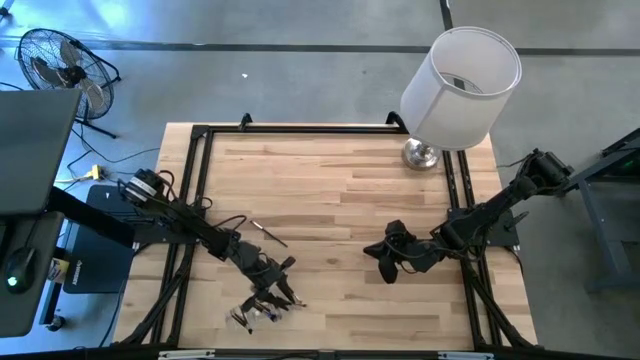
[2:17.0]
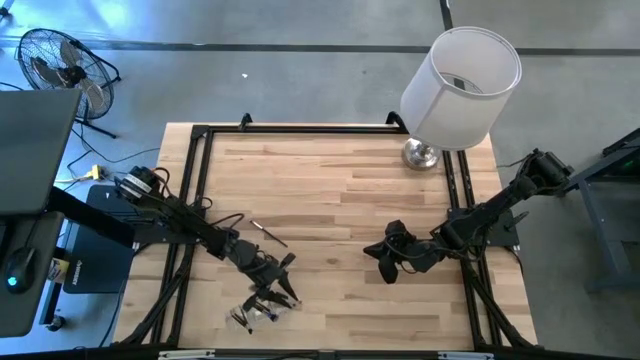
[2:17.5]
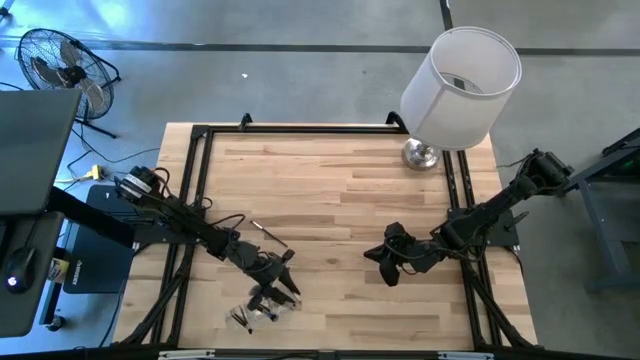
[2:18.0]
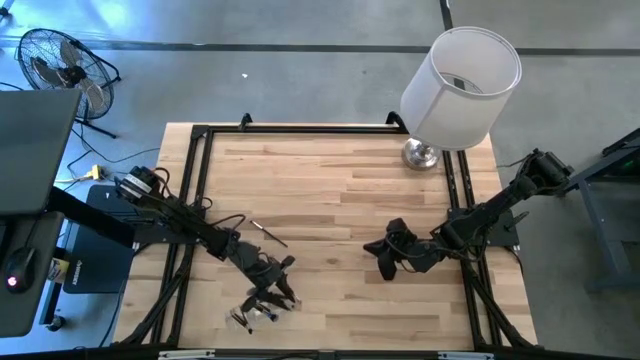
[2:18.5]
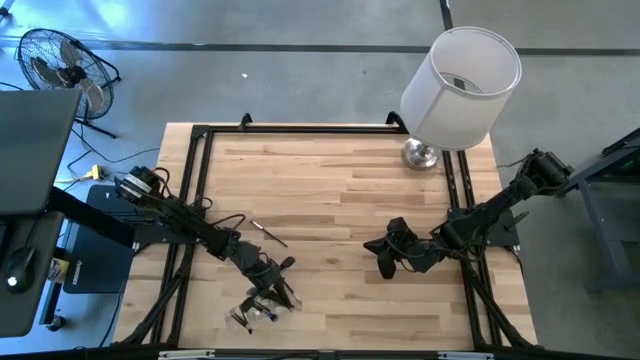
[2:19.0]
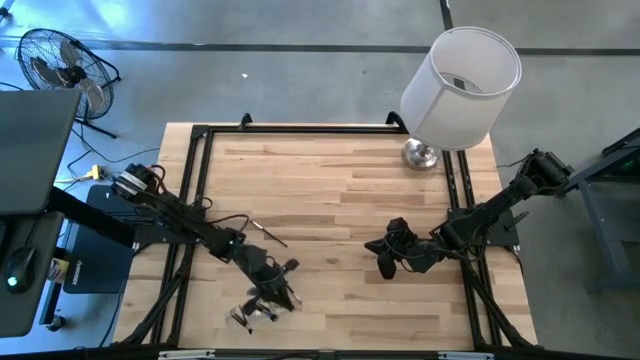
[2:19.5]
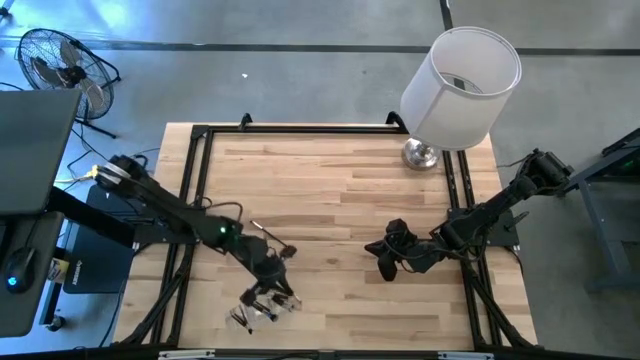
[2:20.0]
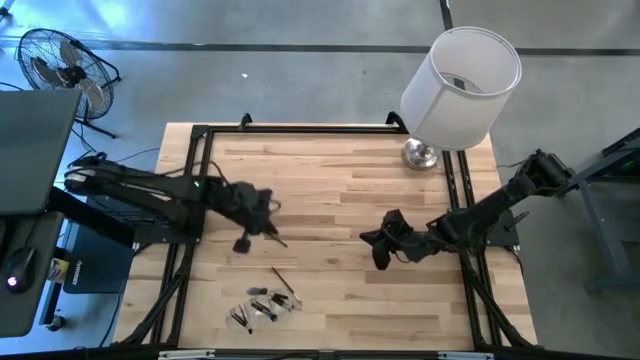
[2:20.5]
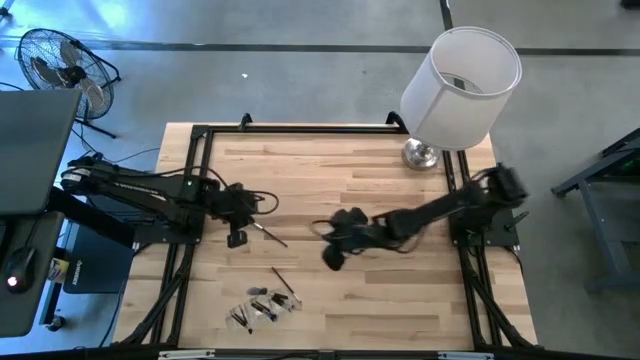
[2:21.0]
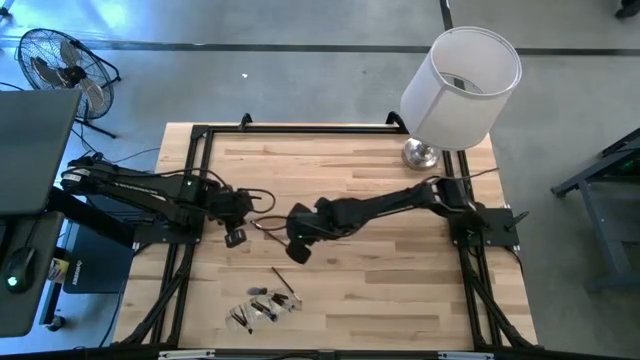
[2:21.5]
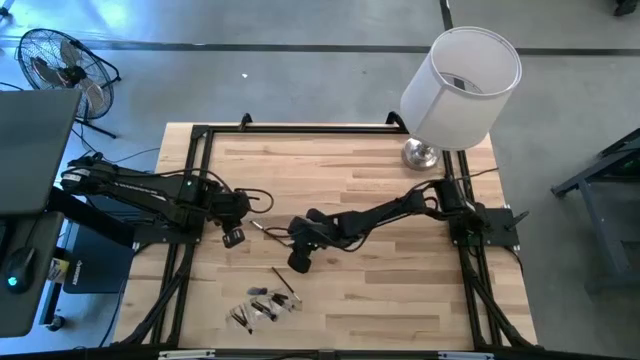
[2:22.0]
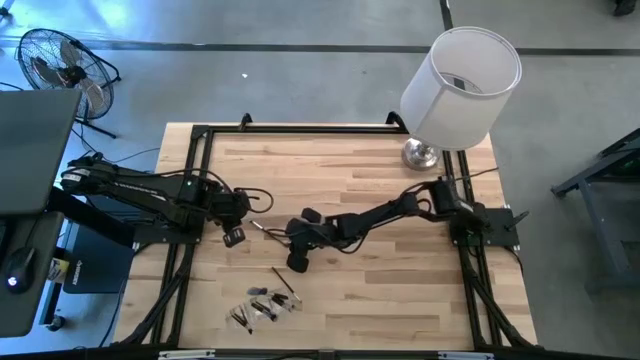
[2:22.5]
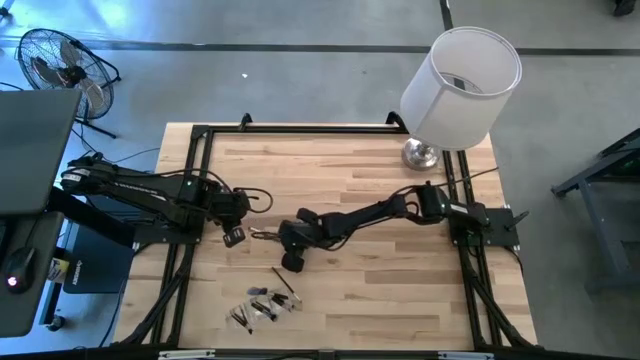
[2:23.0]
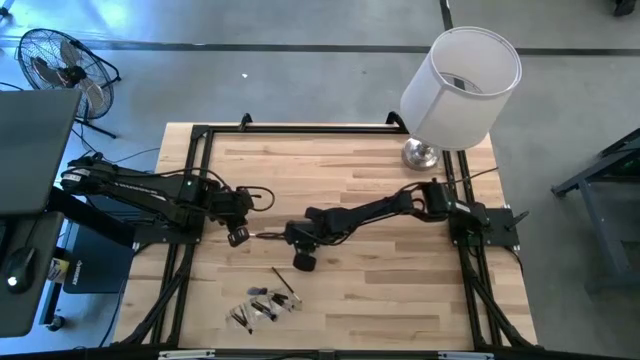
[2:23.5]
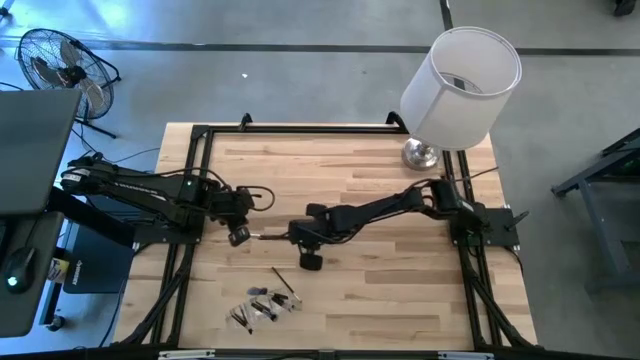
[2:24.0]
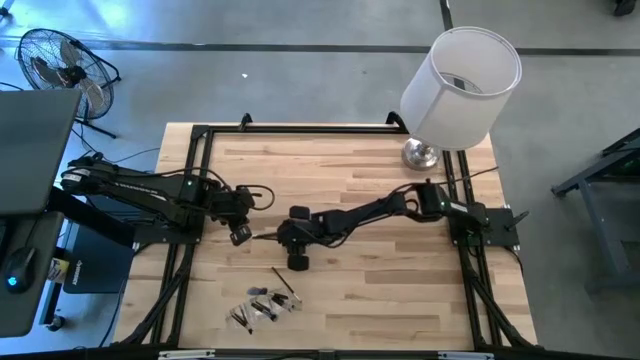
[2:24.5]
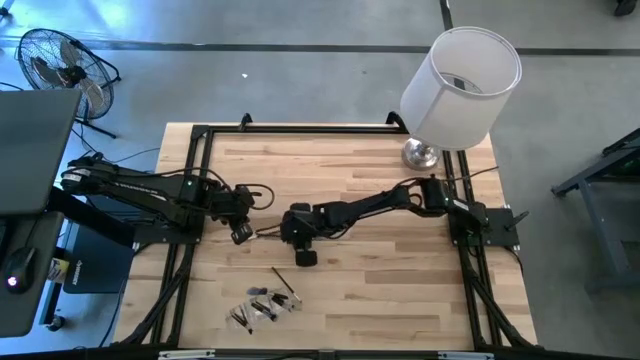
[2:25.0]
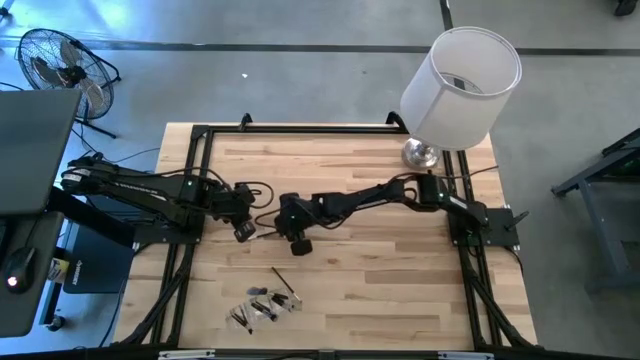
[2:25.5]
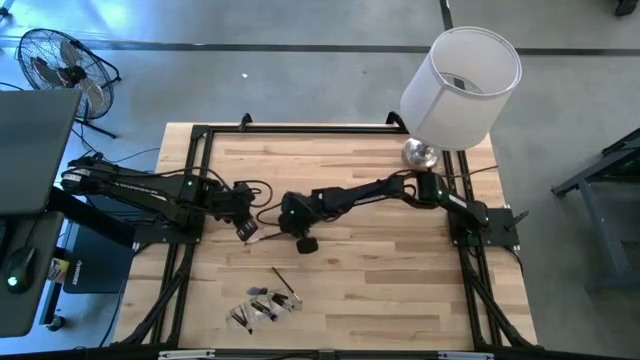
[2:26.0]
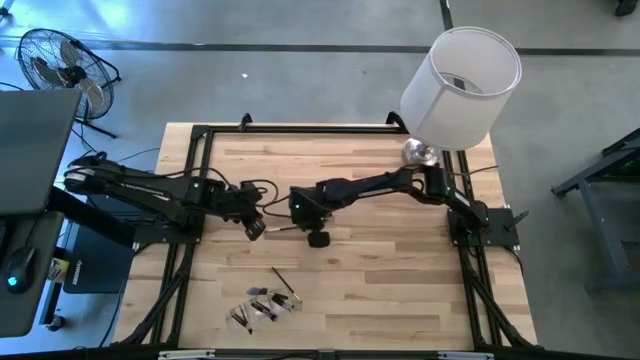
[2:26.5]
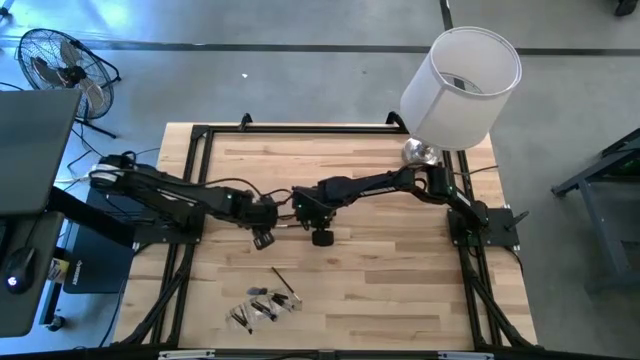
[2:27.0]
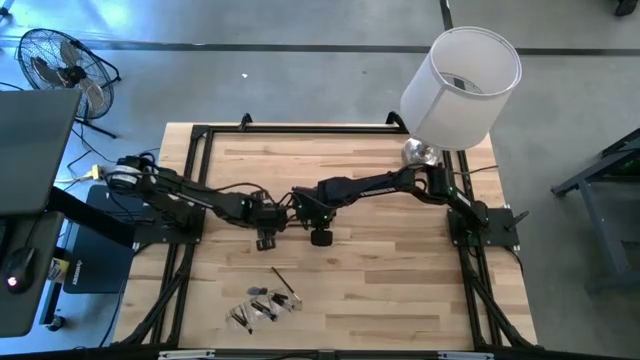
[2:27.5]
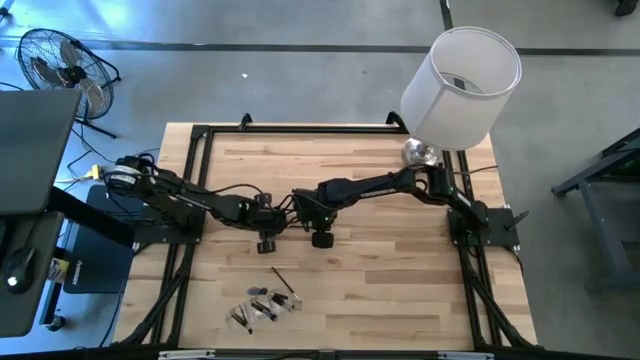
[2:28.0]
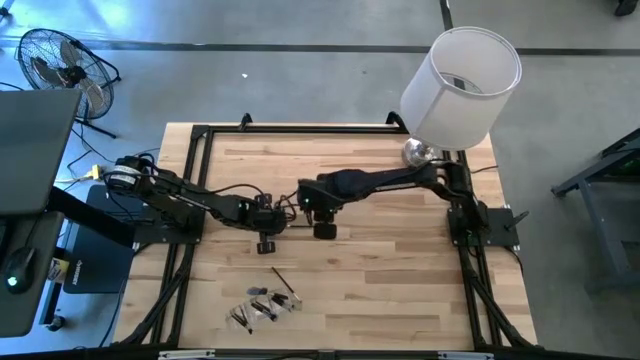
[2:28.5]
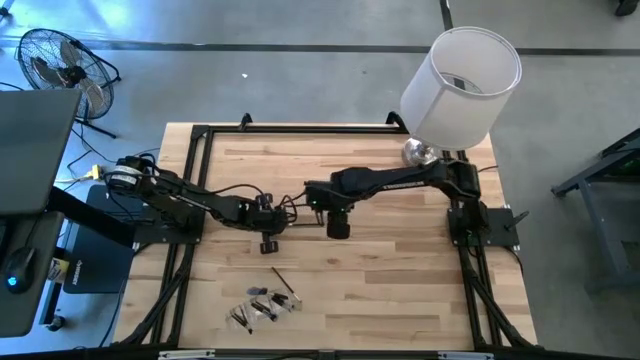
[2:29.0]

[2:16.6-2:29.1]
Task: Pick & Place Makeup Supplies
Put the silver makeup brush into the transparent organizer

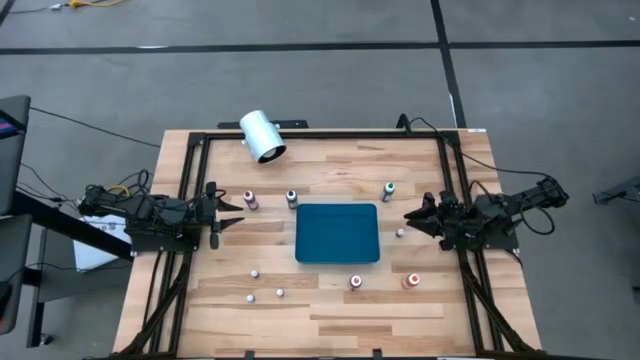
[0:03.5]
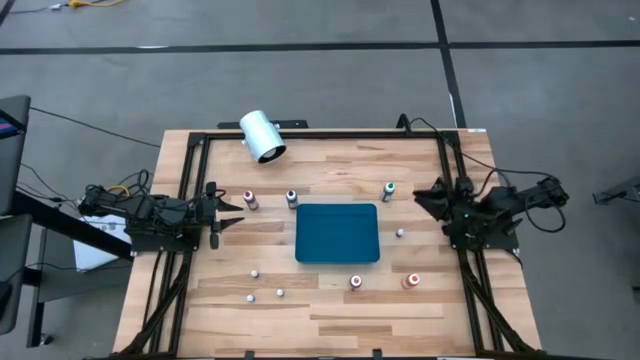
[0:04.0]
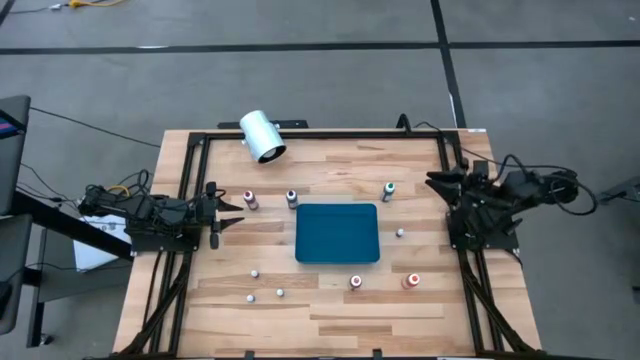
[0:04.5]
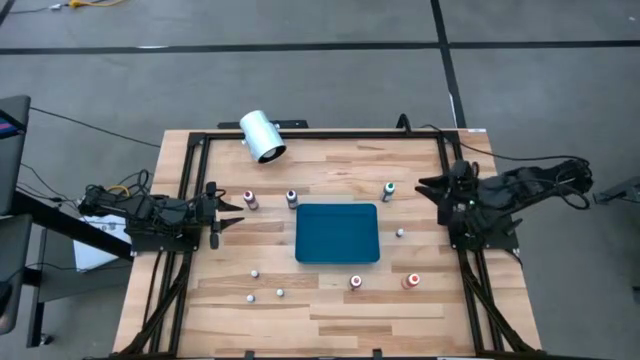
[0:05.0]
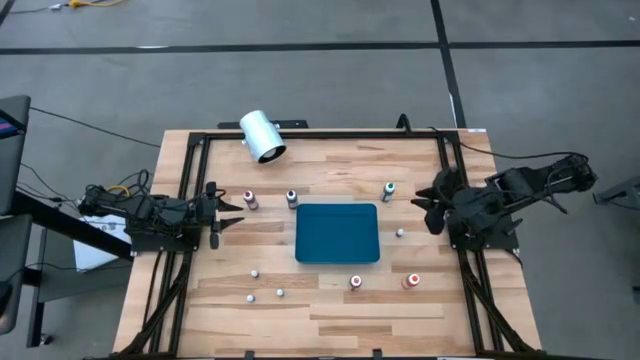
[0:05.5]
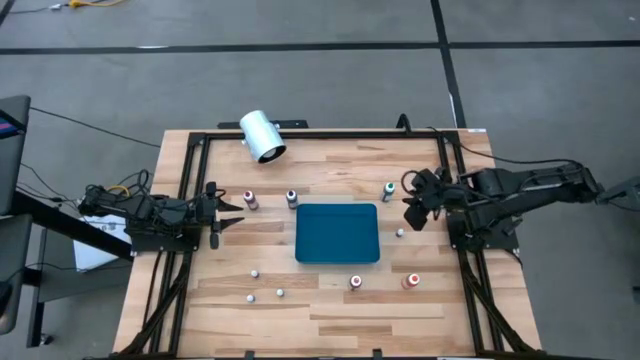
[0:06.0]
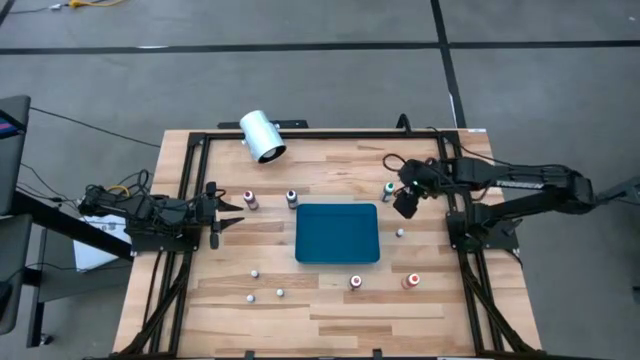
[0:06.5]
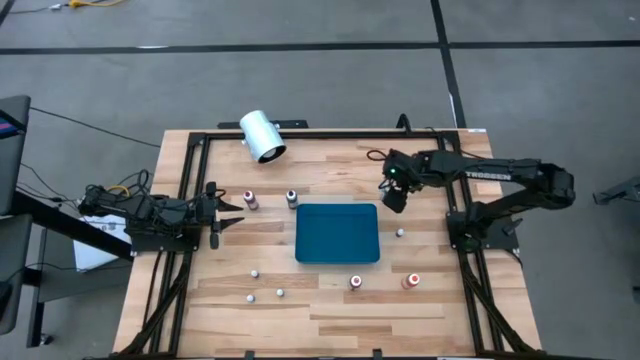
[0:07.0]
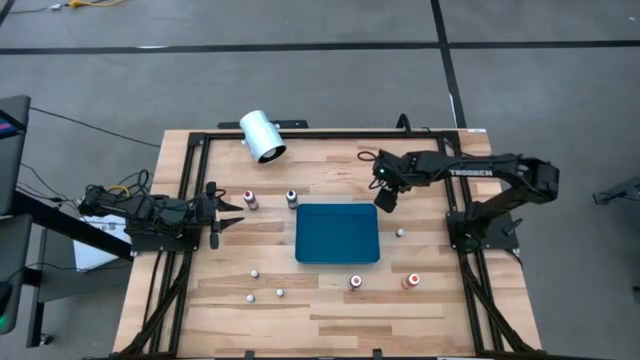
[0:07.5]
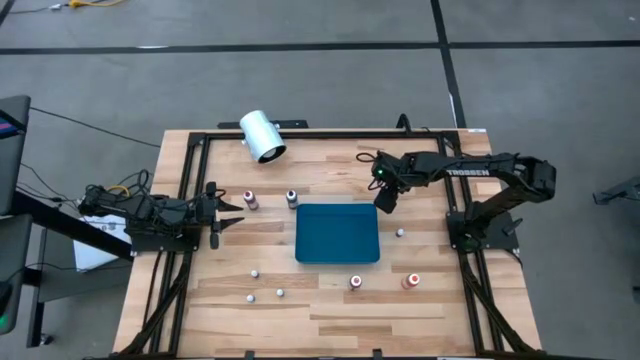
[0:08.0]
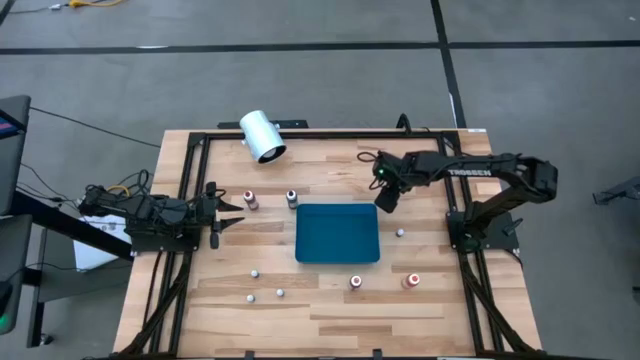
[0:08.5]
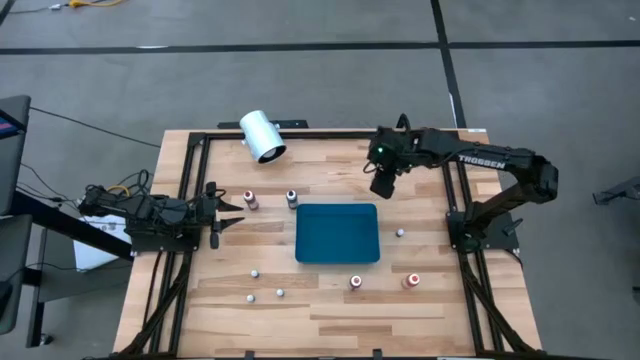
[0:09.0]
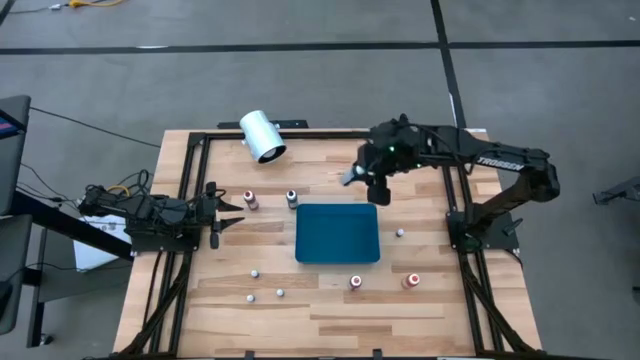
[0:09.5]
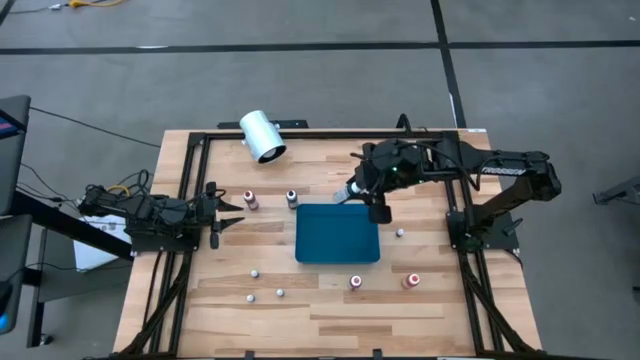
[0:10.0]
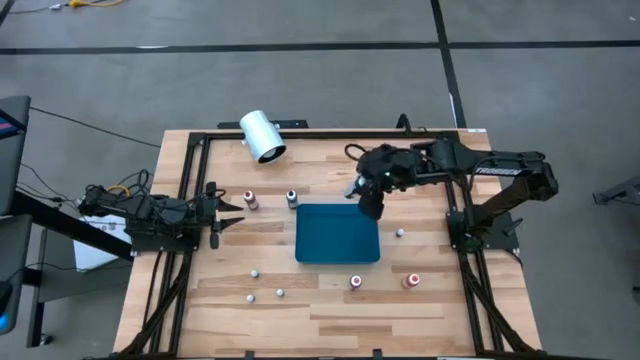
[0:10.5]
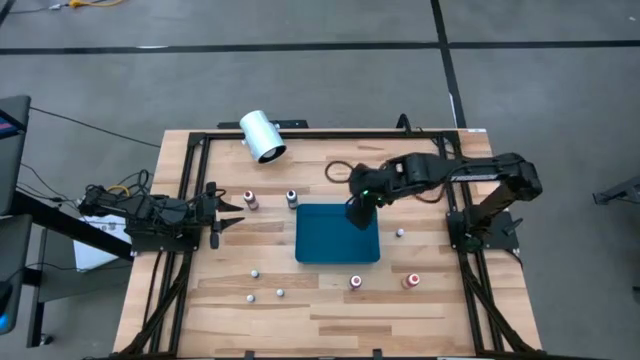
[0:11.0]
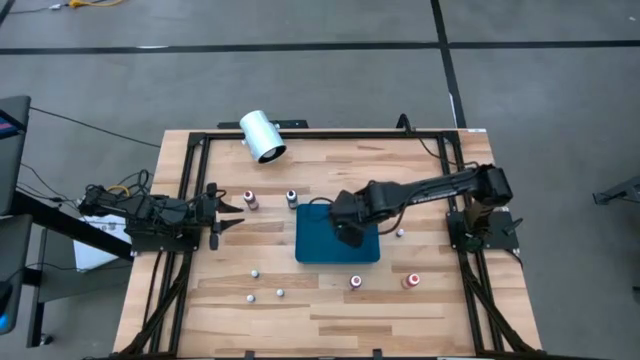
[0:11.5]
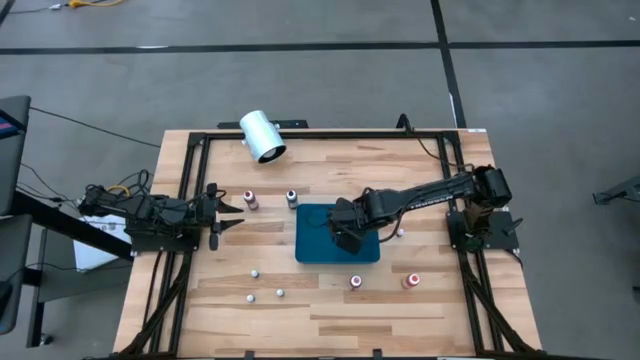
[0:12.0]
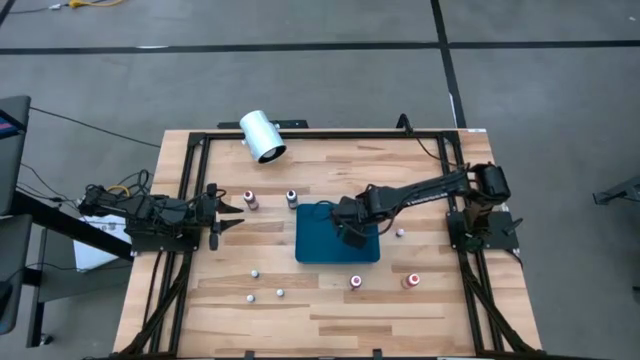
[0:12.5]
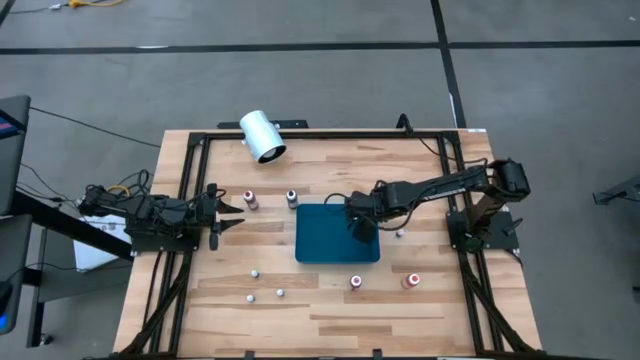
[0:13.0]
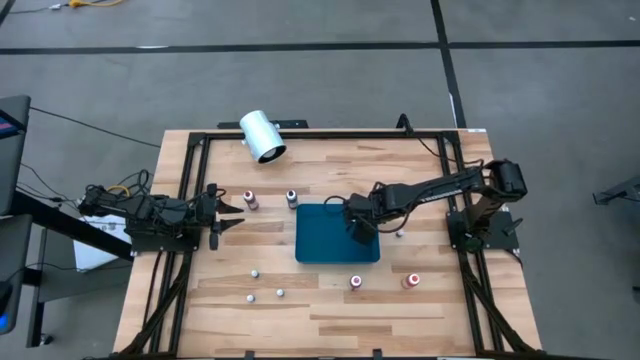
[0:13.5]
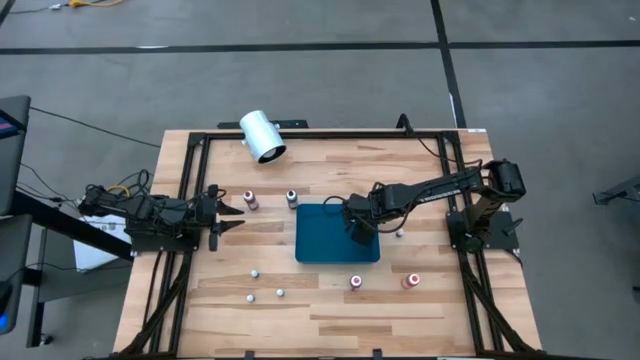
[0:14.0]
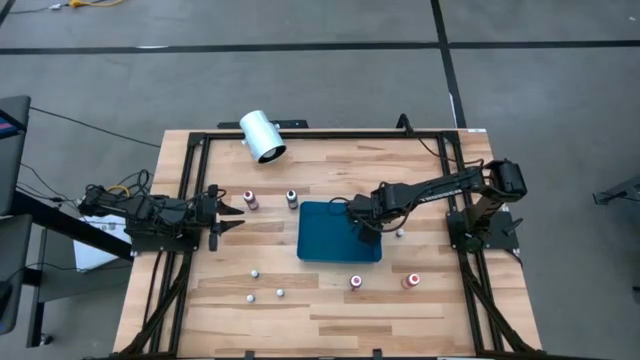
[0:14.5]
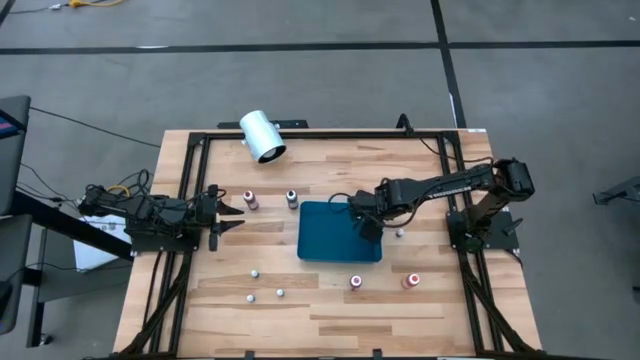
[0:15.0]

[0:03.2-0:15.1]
Task: Pick & Place food coloring
Put the large green food coloring bottle into the blue bin
